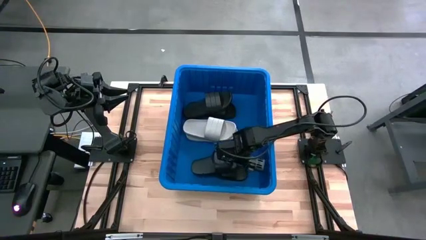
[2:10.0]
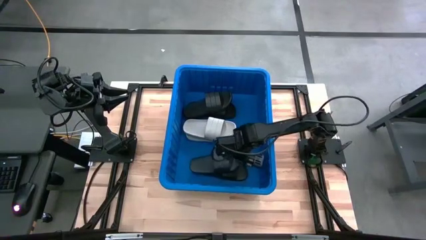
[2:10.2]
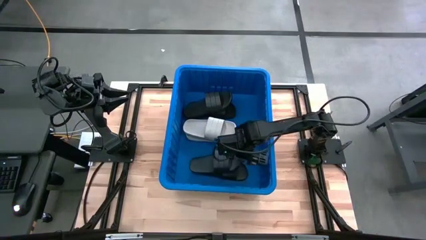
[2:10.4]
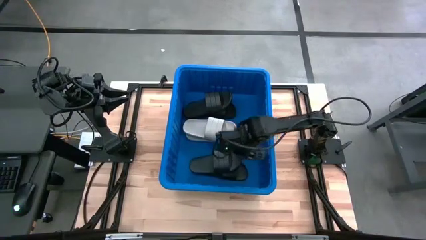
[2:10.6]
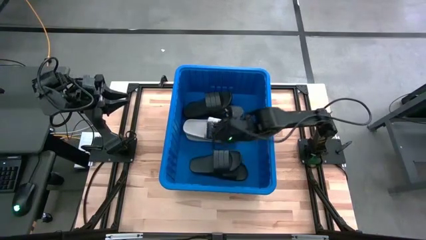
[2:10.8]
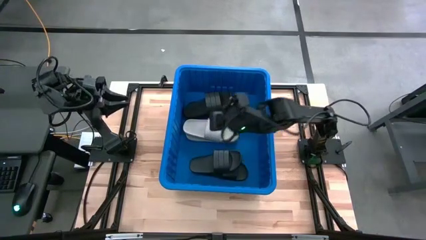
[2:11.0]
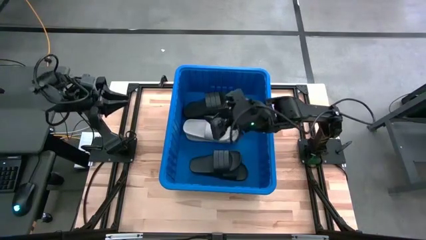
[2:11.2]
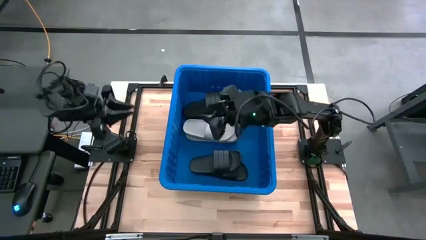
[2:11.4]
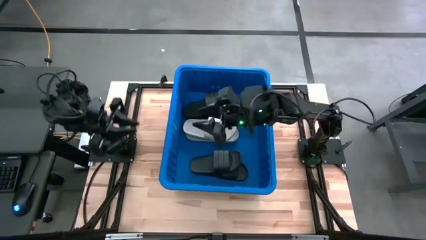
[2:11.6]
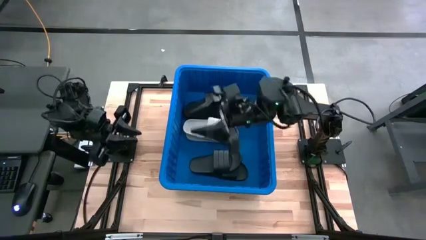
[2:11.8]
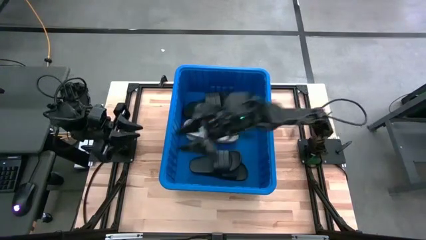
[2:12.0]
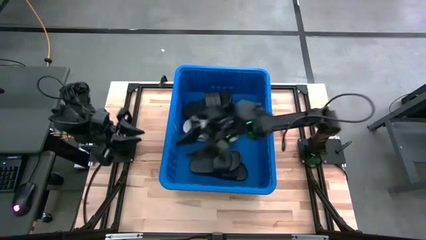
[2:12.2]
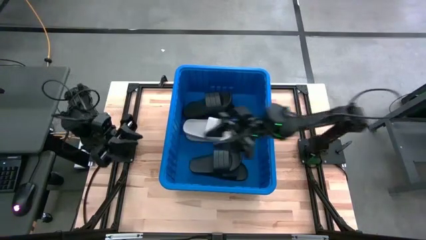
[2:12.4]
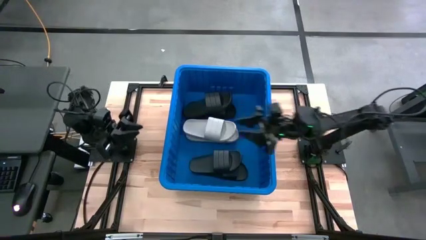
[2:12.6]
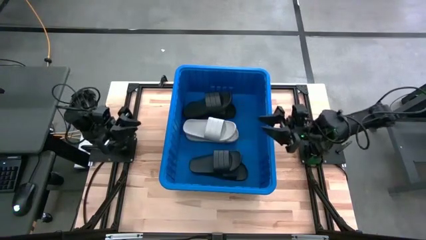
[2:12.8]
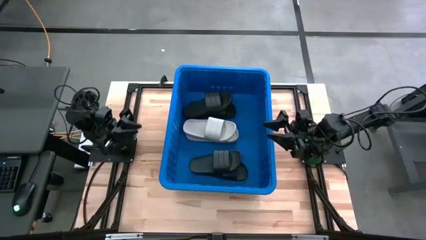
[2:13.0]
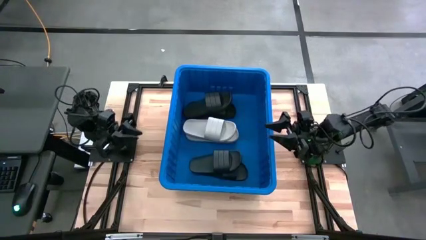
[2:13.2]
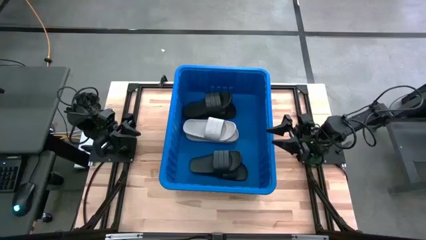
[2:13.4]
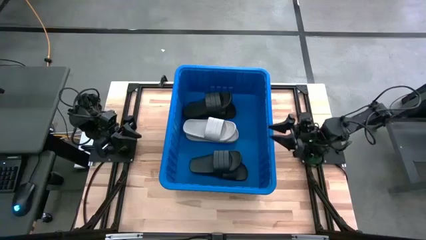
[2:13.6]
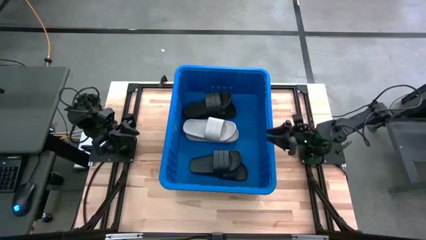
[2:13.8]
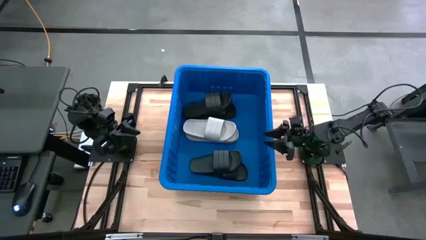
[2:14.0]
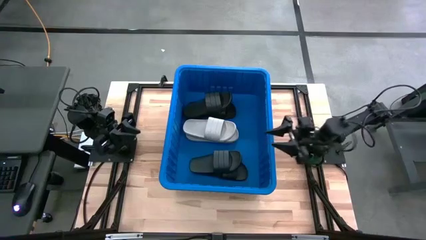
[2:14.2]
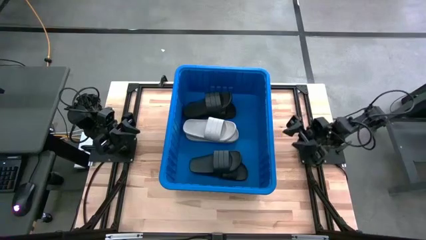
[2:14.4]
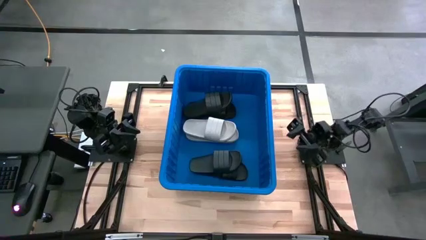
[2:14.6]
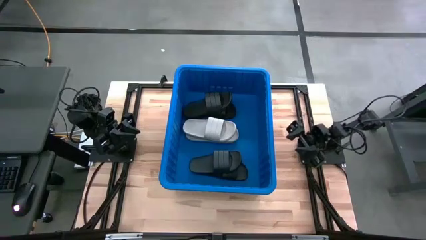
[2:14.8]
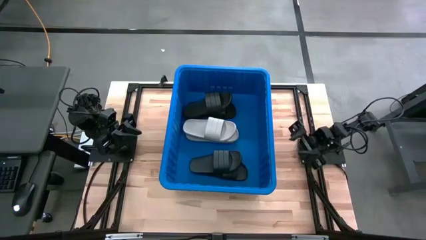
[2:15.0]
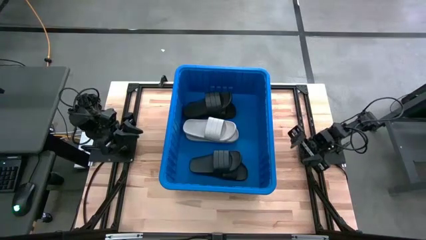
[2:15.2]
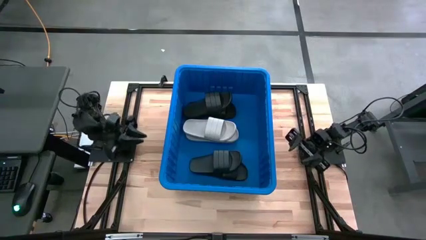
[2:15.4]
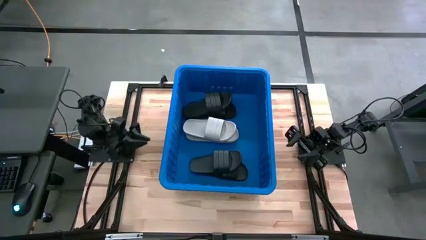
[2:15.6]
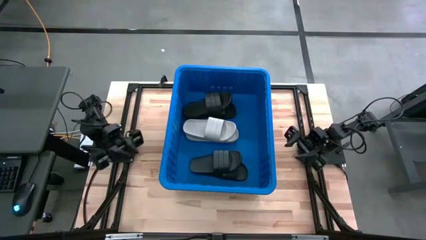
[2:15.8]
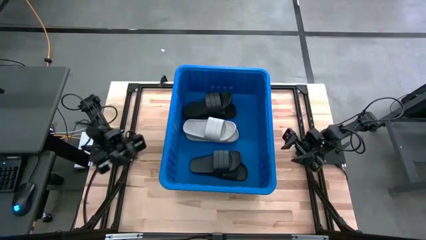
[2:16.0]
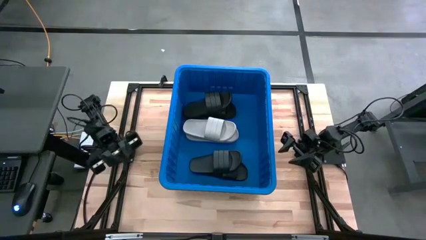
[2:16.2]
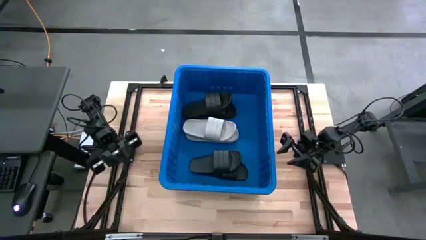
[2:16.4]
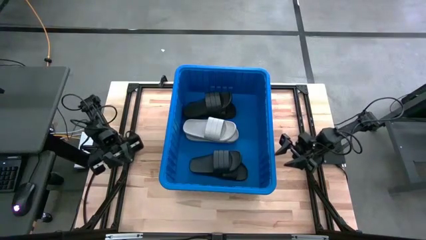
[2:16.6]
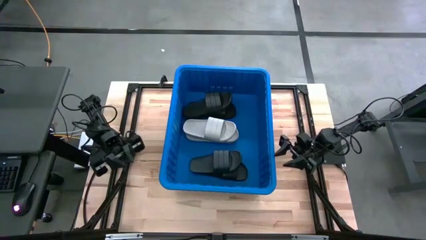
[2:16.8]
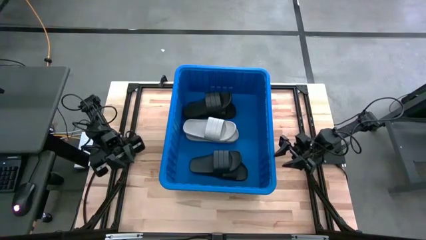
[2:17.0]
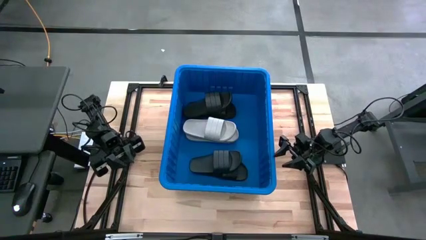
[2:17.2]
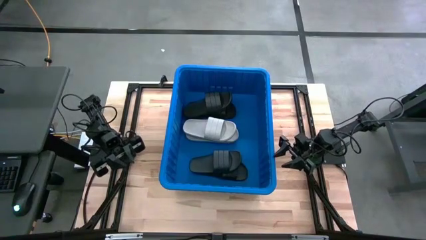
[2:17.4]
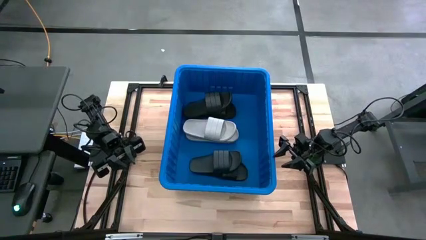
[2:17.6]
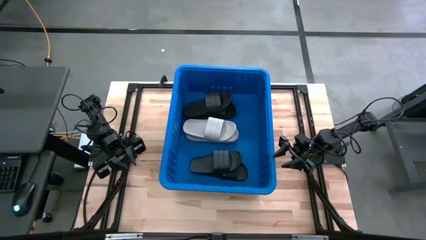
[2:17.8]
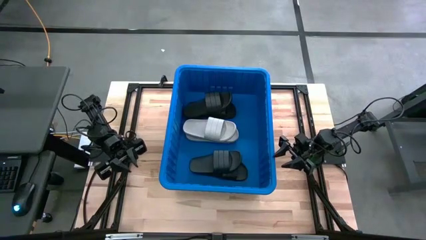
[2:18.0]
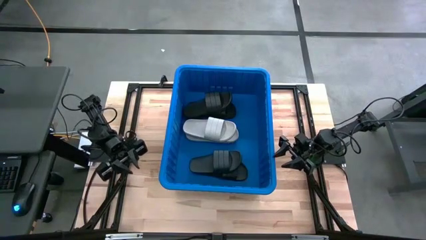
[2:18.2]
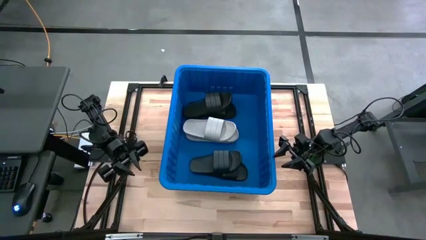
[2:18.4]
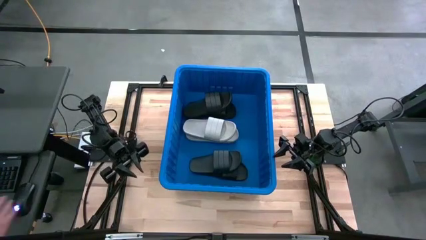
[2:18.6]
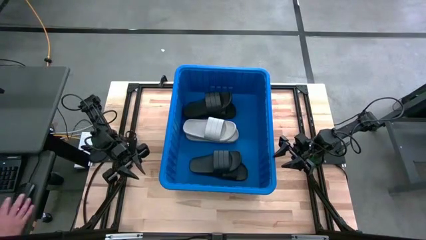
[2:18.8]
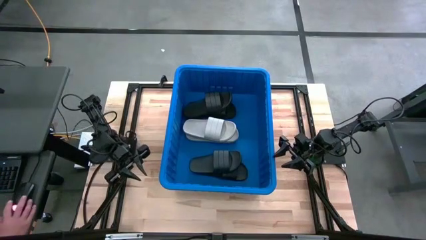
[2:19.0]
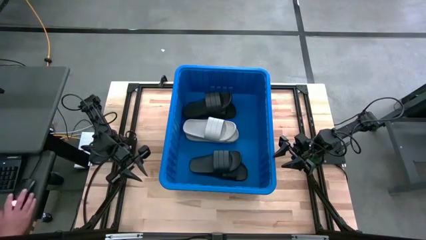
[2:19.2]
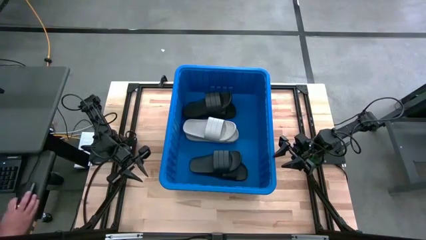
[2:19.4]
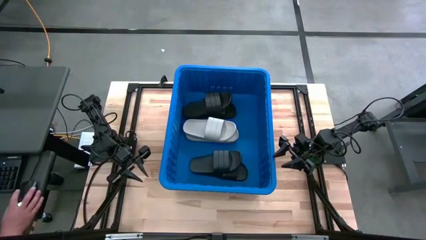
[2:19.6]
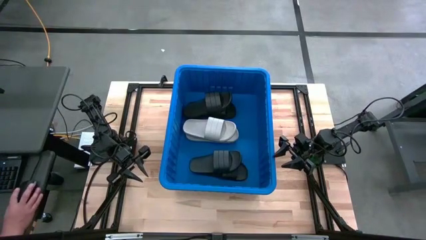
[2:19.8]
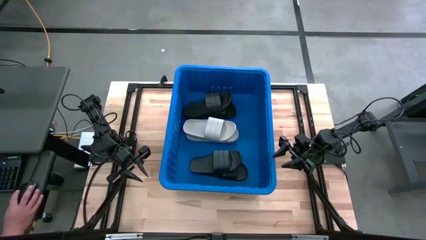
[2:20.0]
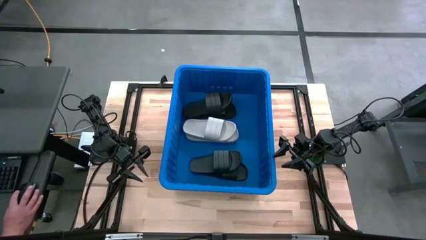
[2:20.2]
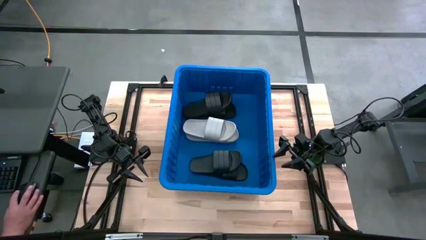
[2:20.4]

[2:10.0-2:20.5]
Task: Pick and place slides into bin
Return to Home Position
